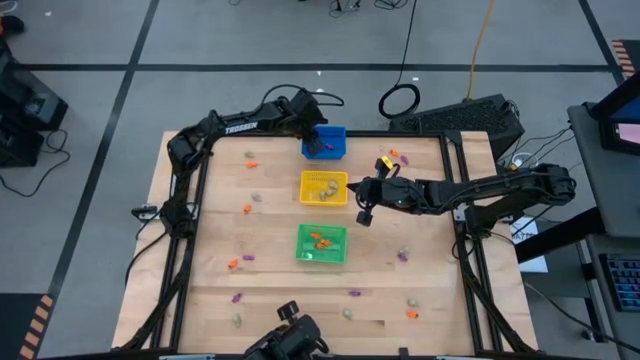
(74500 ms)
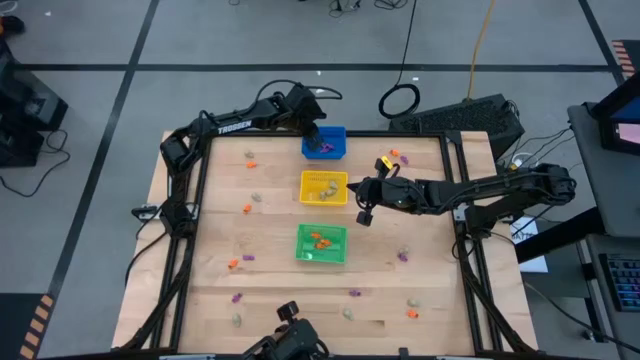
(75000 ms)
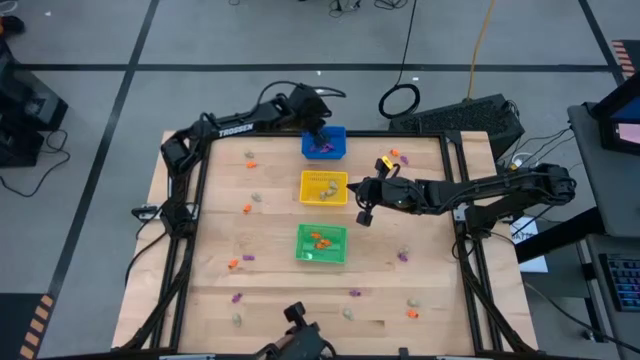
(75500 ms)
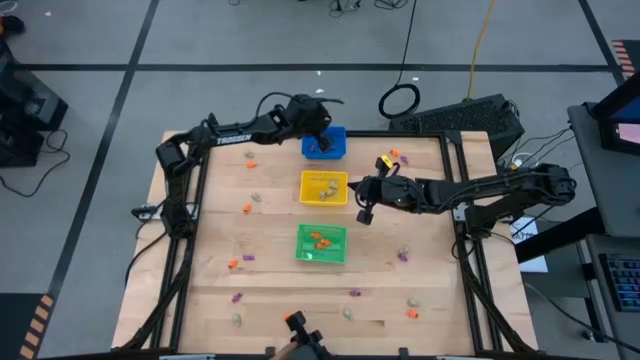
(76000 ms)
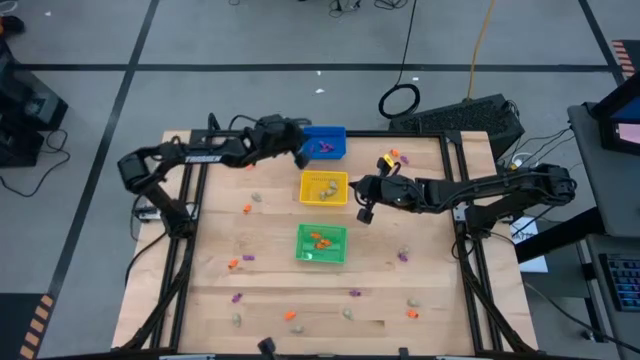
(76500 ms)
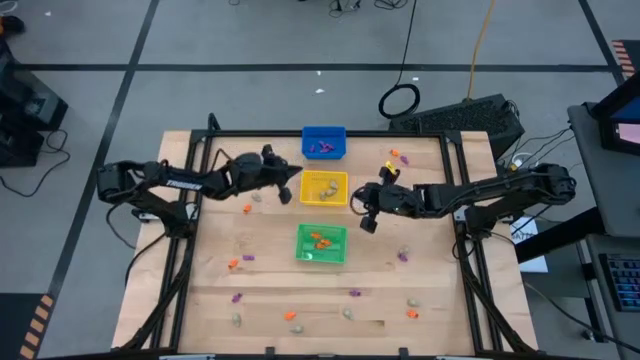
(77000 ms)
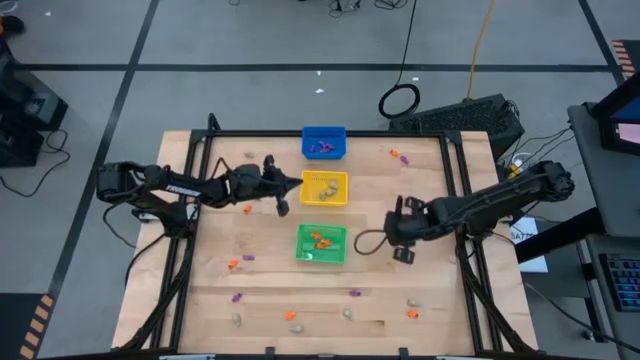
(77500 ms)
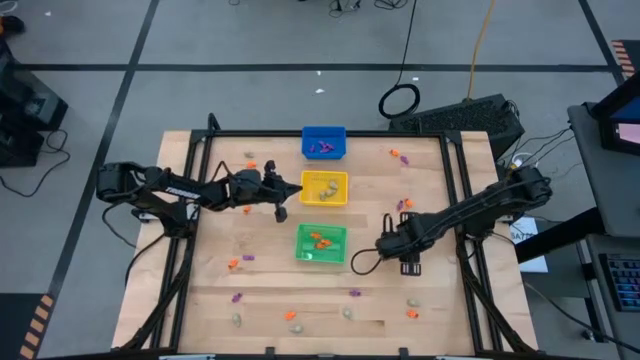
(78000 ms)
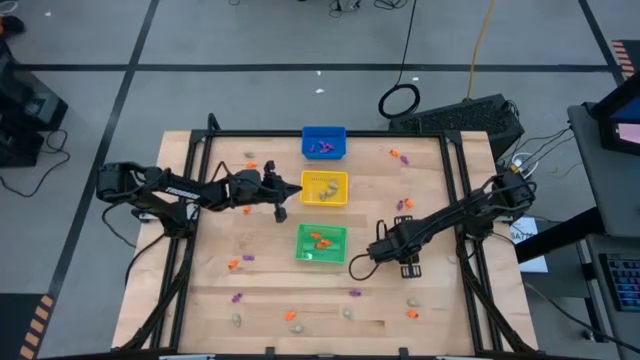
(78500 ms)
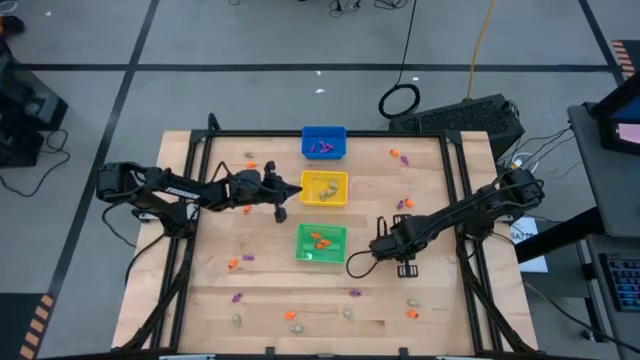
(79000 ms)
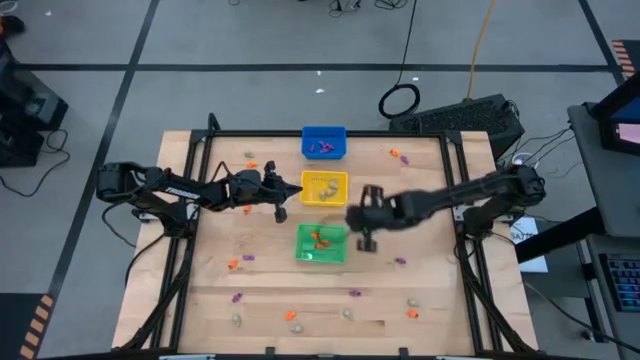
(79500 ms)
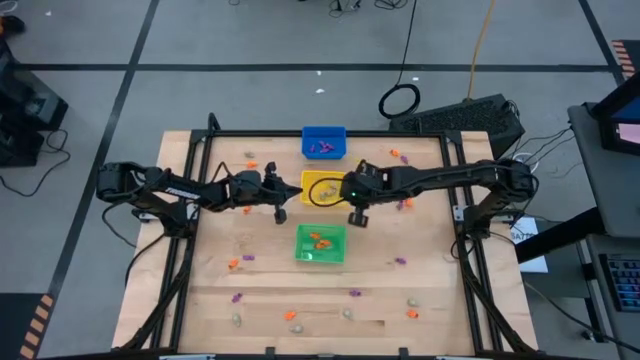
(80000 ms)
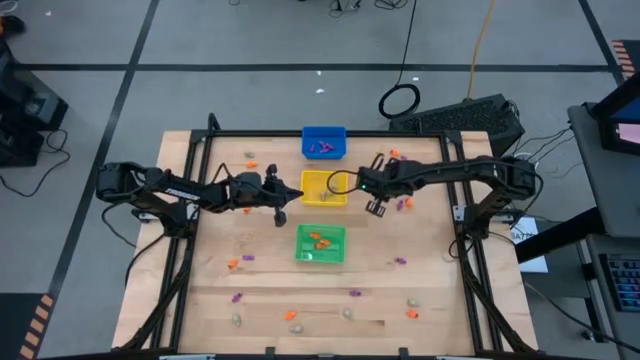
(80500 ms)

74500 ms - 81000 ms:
Task: Sort Halloween decoration
Put the skull toy into the yellow bin

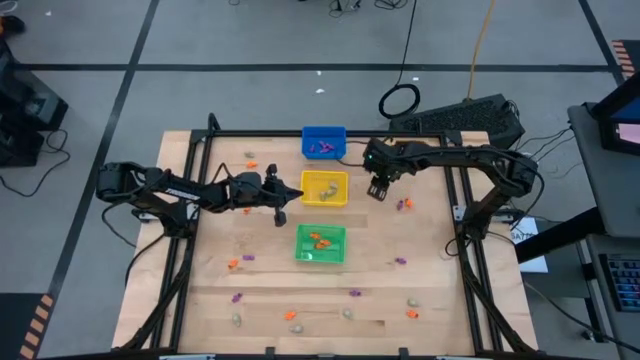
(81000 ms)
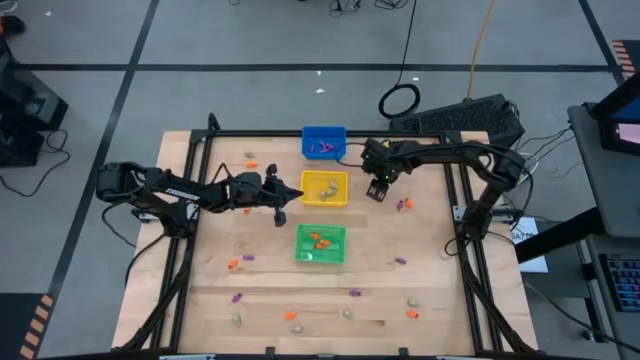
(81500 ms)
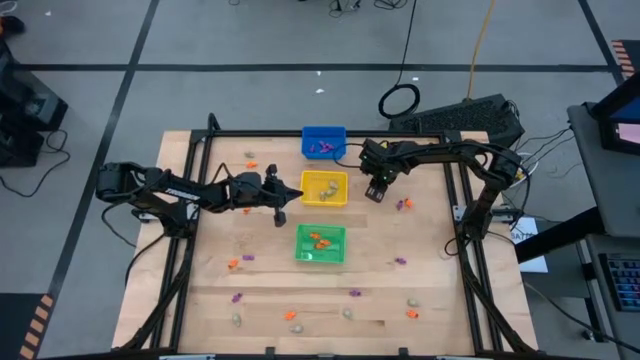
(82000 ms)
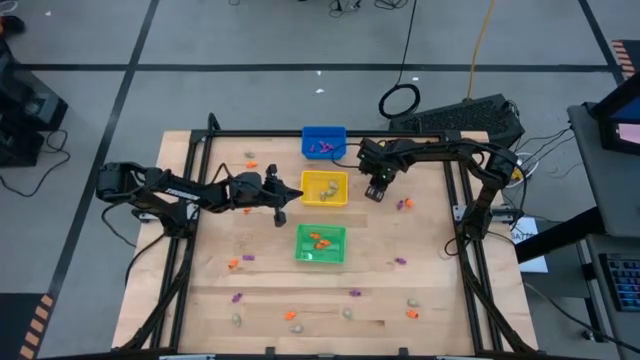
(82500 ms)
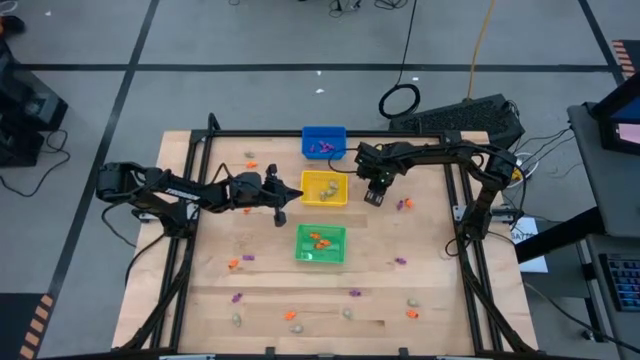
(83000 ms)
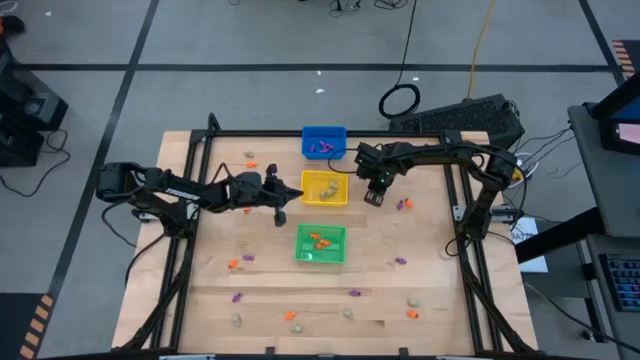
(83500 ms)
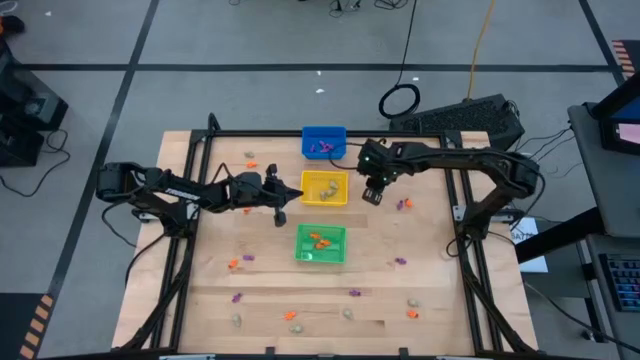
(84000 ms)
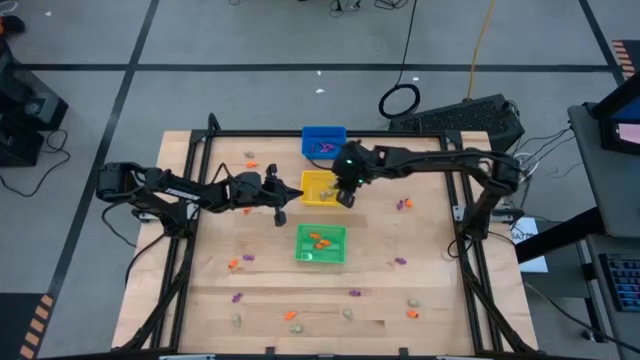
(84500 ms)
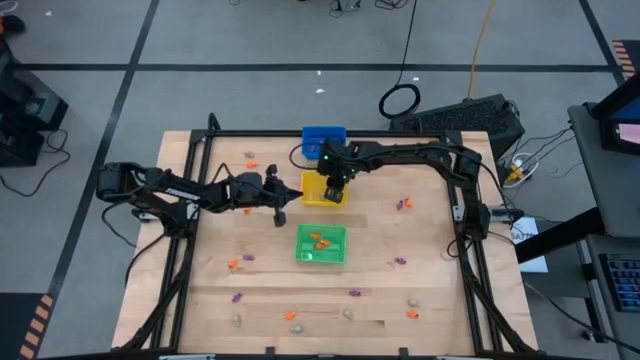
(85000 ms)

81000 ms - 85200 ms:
Put the skull toy into the yellow bin

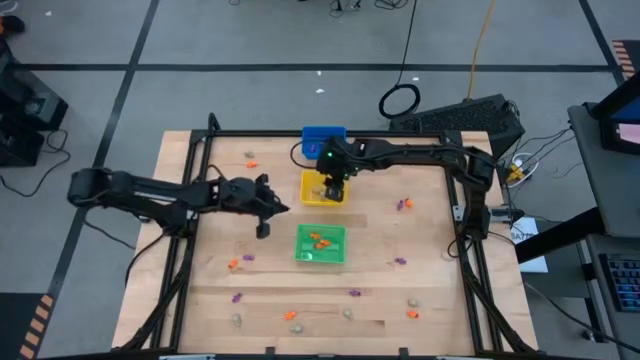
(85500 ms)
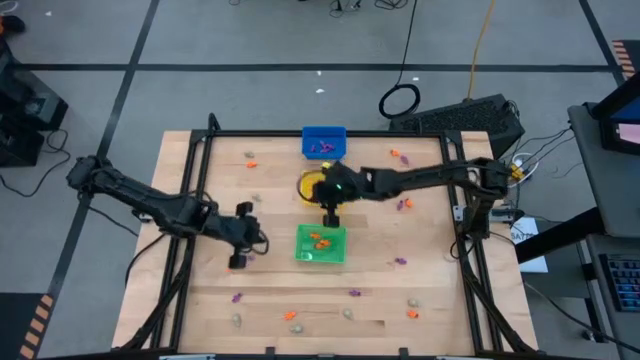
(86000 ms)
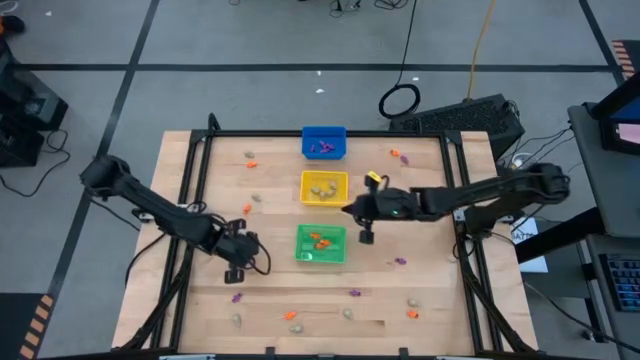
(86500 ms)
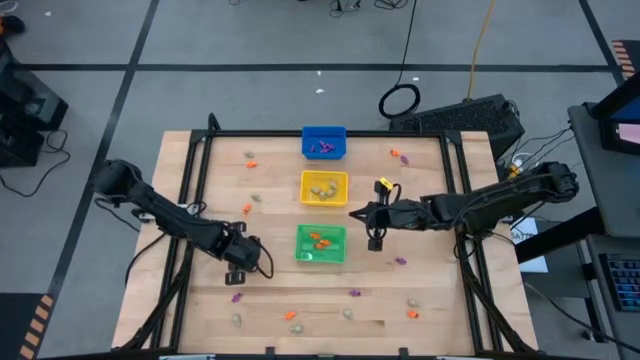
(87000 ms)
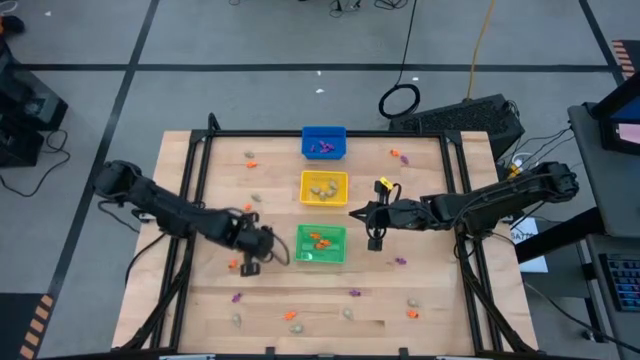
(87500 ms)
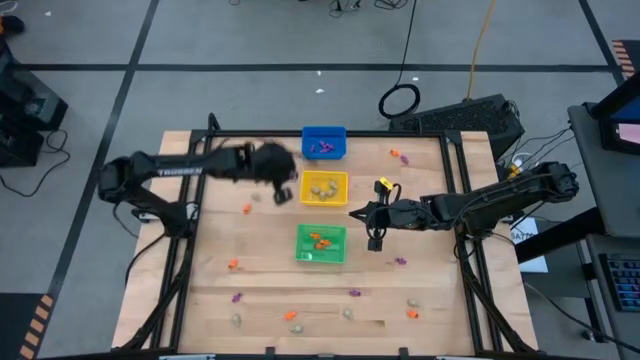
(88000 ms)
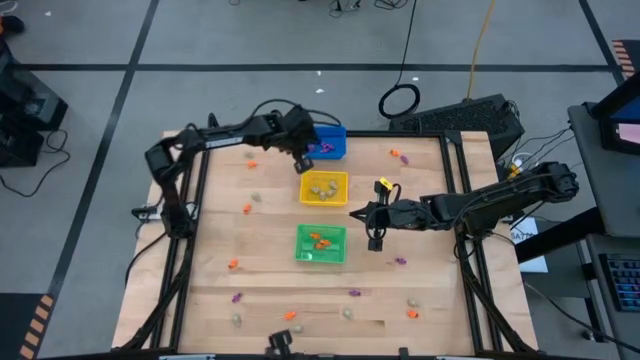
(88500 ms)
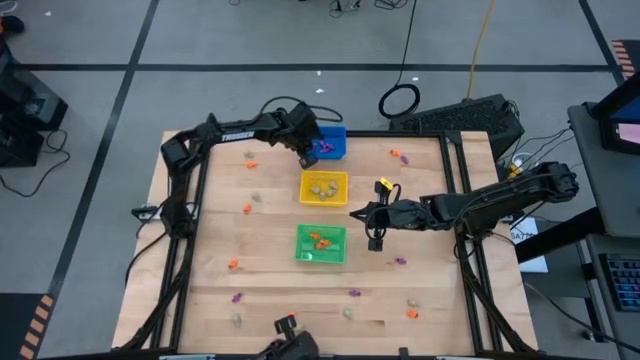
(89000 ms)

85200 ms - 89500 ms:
Put the purple skeleton toy into the blue bin

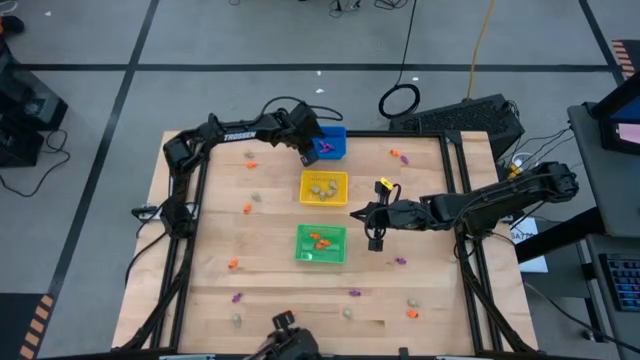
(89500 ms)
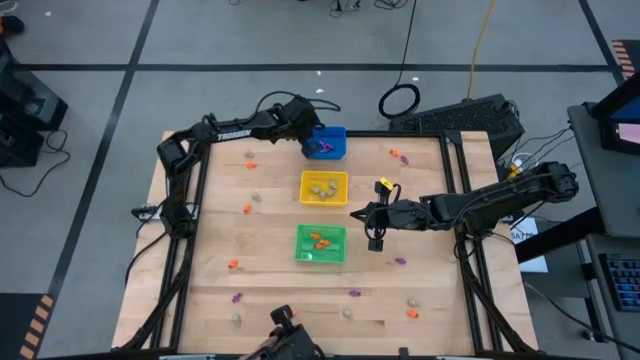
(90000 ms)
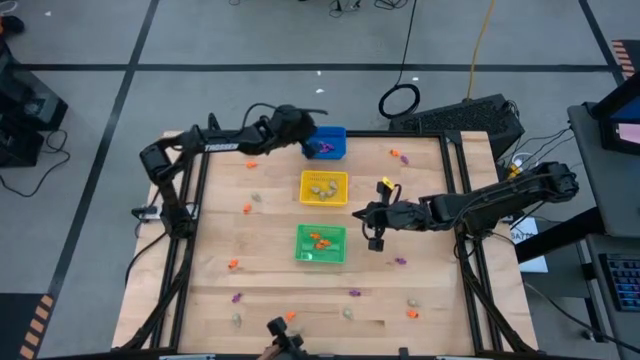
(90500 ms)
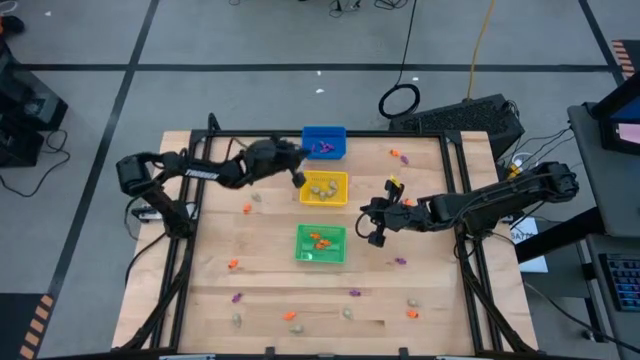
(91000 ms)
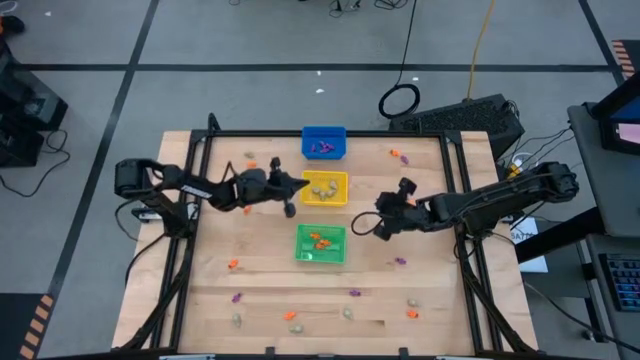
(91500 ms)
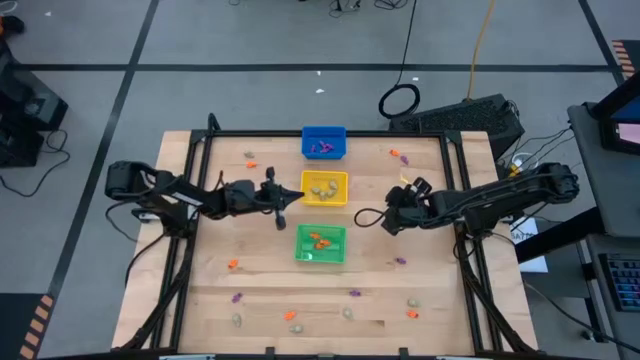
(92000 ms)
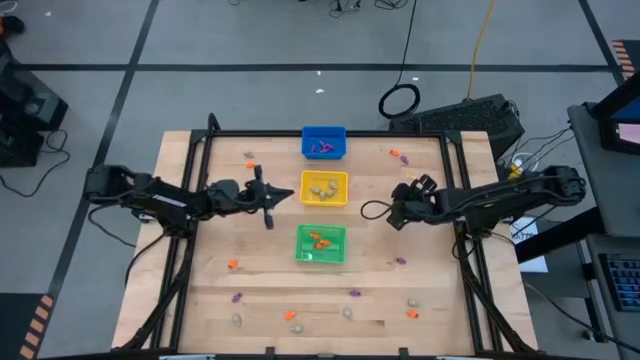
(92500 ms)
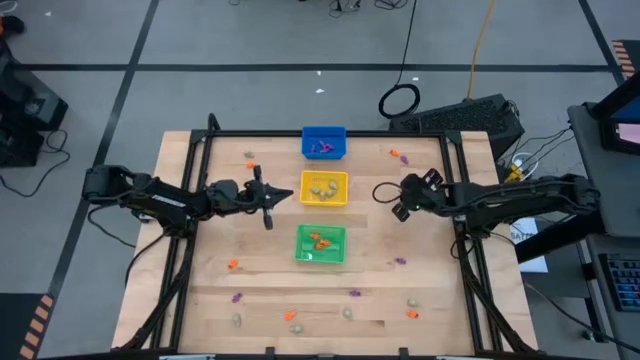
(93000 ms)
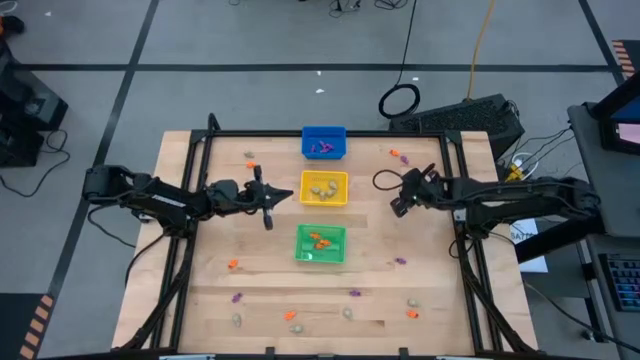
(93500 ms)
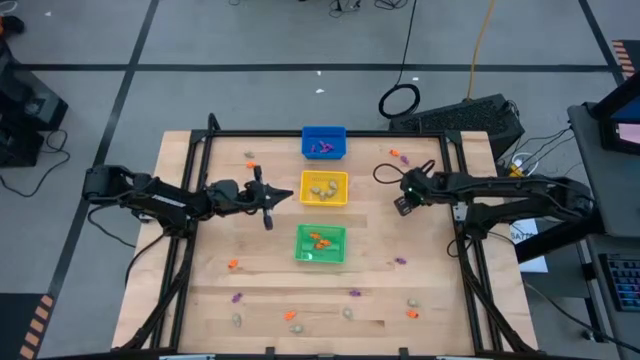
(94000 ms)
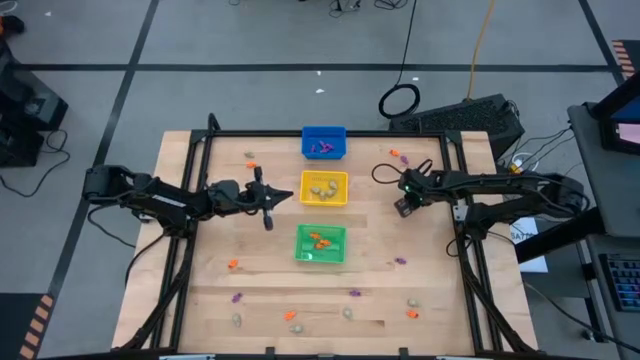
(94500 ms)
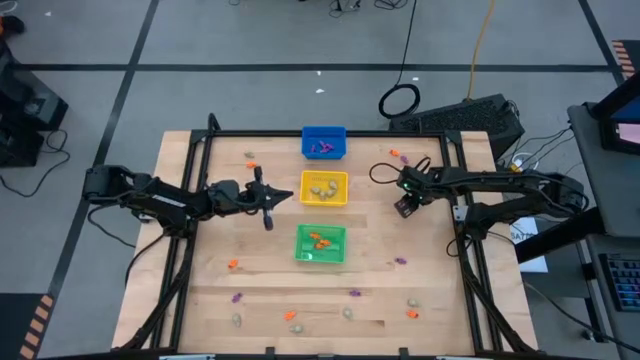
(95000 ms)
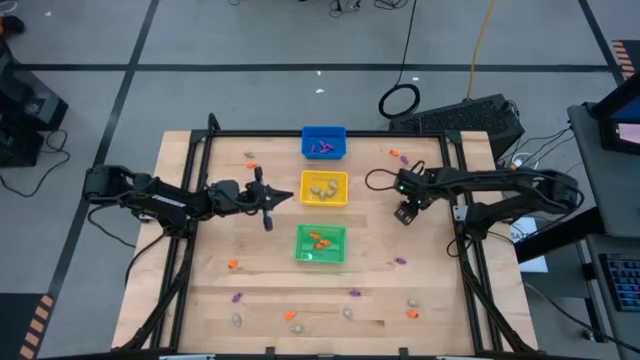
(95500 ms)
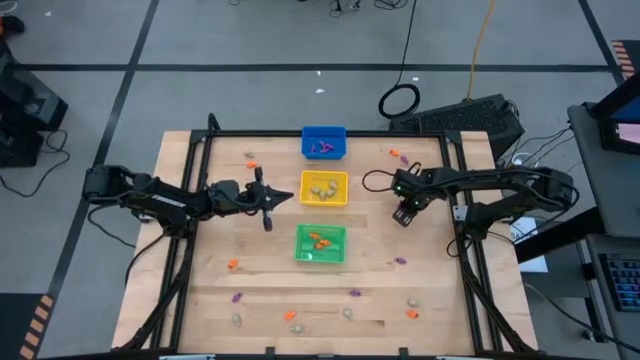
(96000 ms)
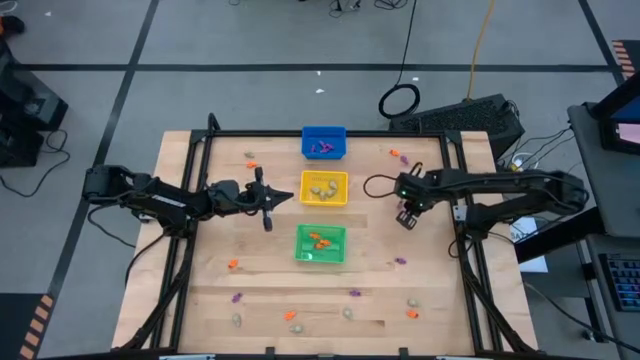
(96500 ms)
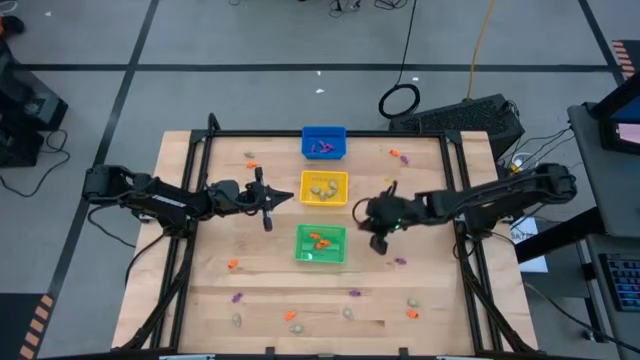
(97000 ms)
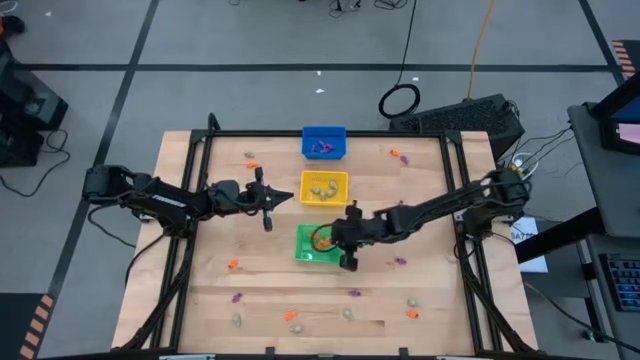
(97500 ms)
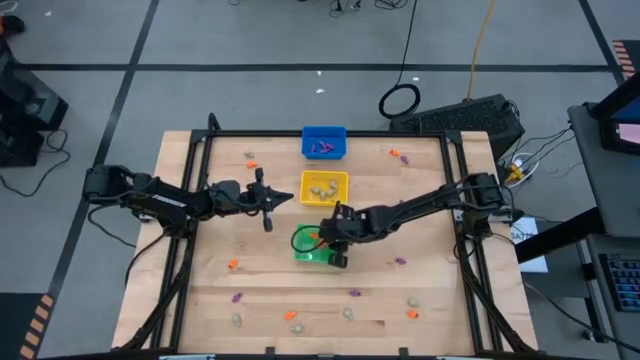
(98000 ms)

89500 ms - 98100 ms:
Put the orange skeleton toy into the green bin
